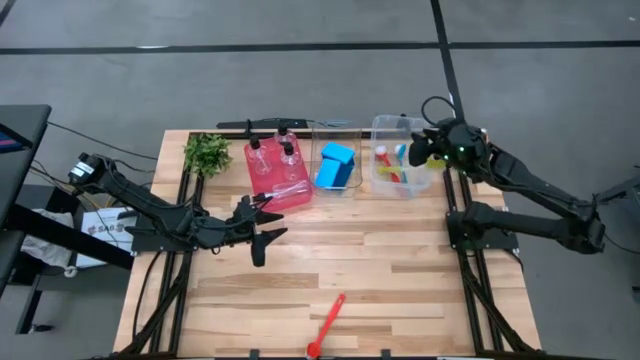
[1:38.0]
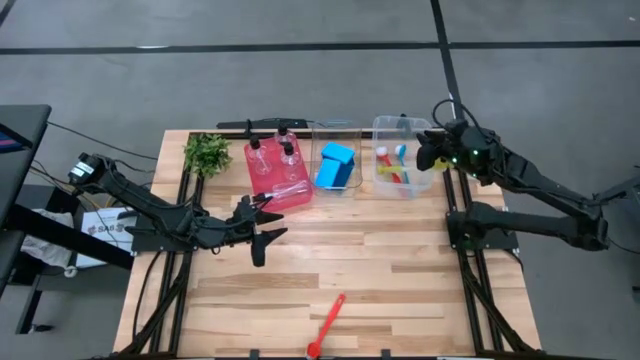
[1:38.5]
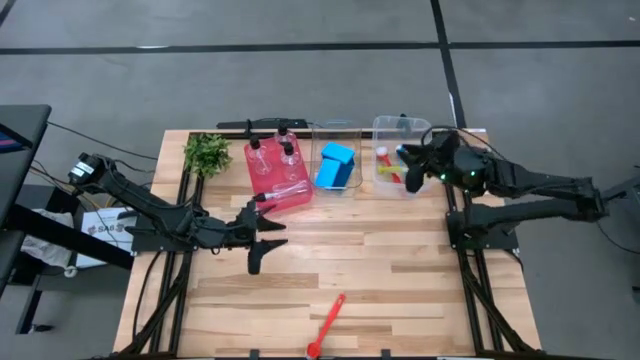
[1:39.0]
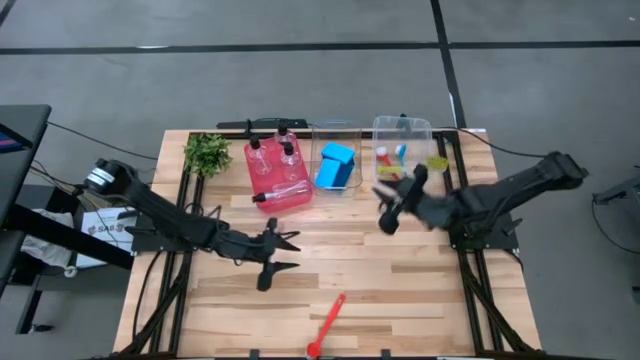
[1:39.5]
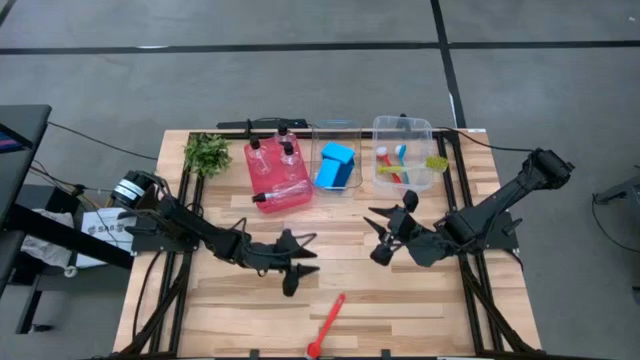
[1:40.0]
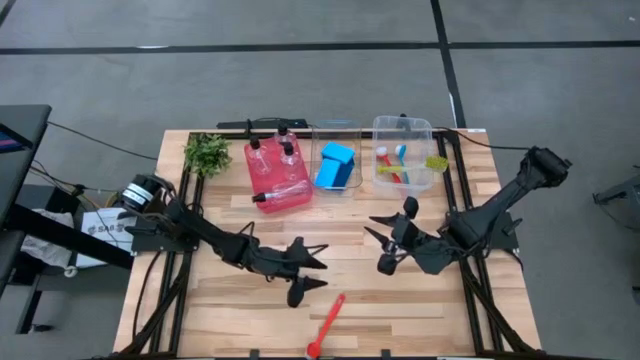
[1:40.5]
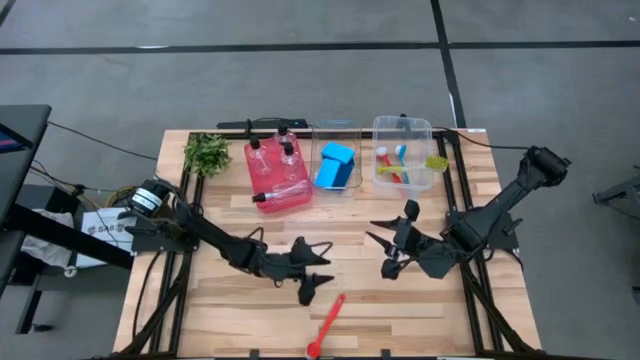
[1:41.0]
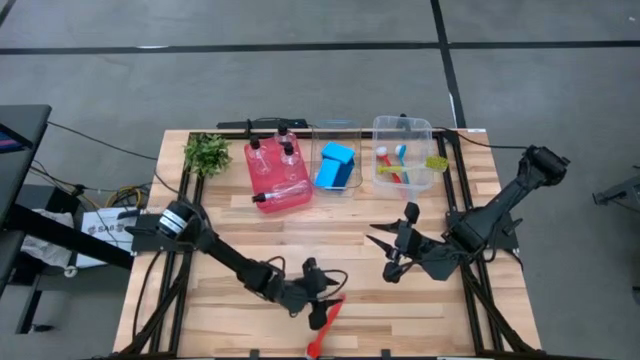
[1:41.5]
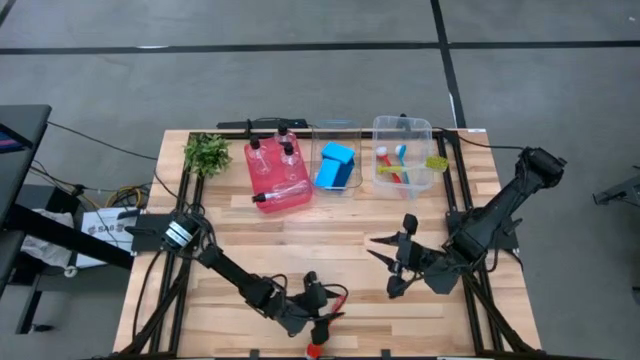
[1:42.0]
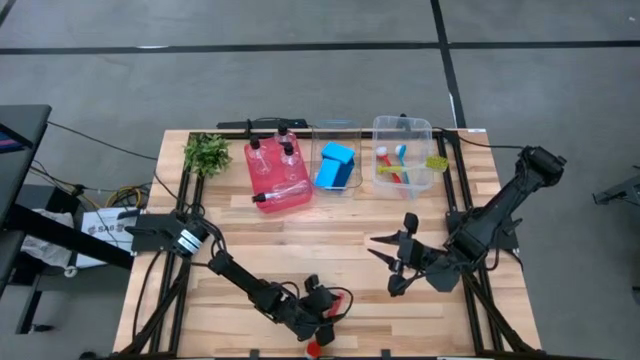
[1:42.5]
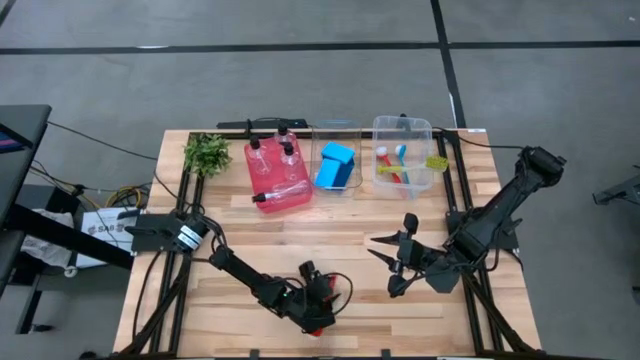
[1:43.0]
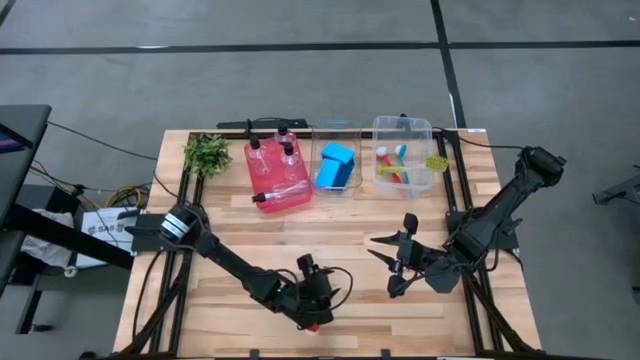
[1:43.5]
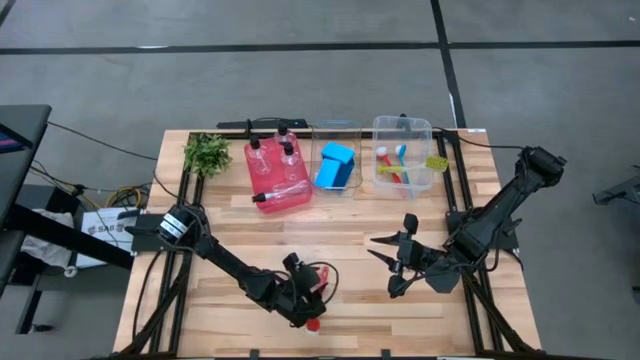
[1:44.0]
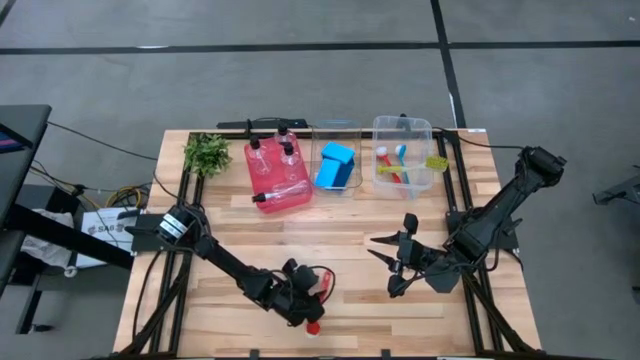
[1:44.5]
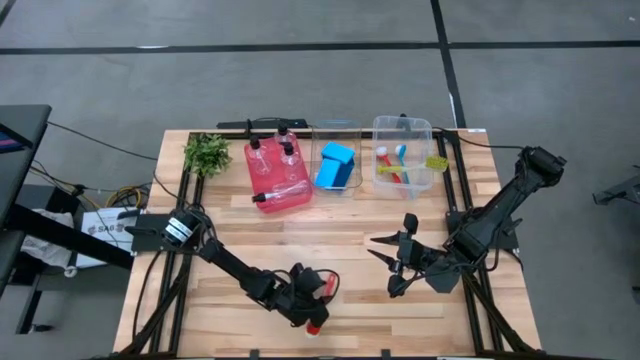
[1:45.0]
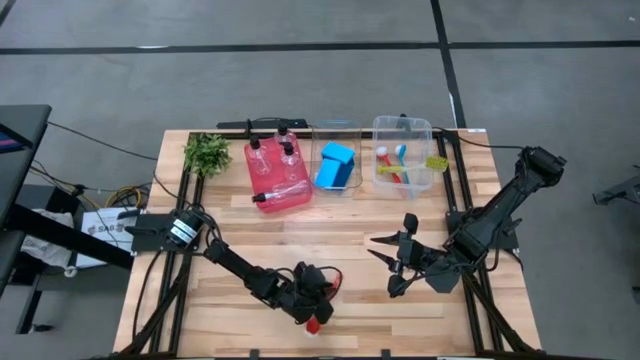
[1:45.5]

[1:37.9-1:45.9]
Task: Pick & Place Kitchen Sink Supplies
Put the green dish brush into the right transparent bin

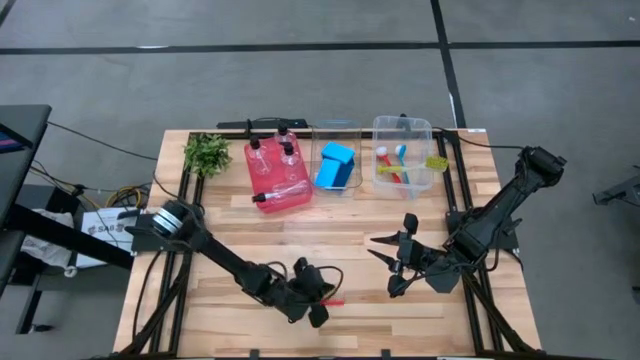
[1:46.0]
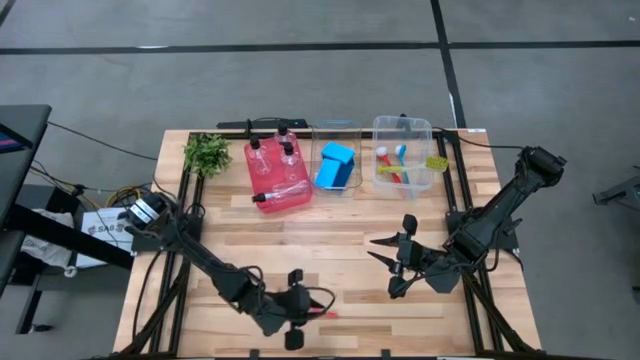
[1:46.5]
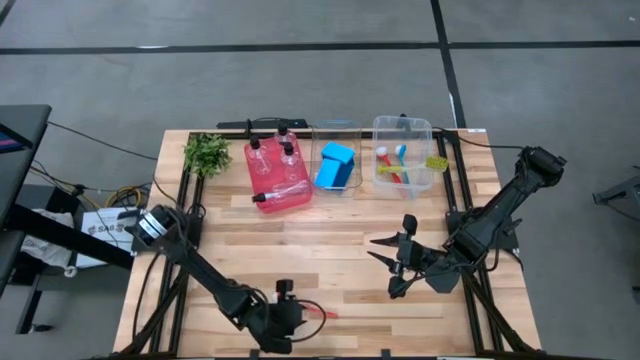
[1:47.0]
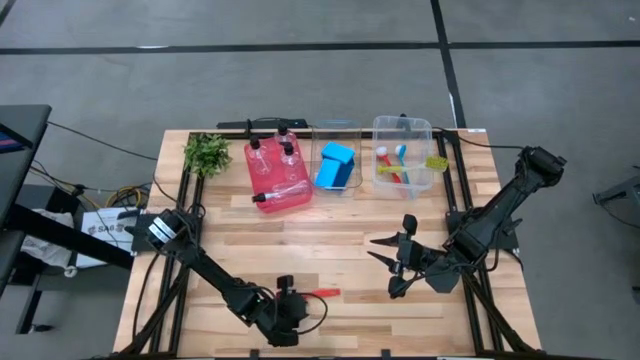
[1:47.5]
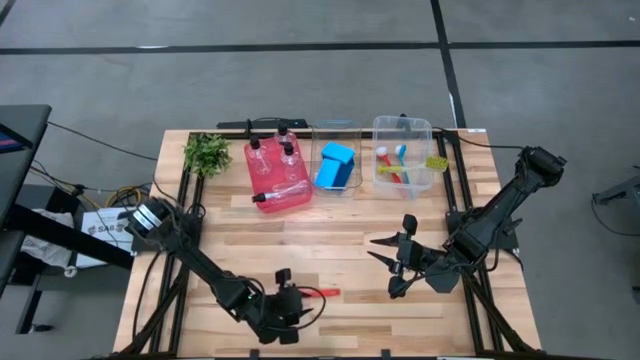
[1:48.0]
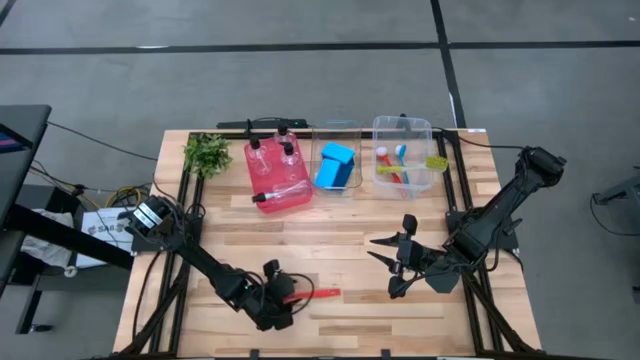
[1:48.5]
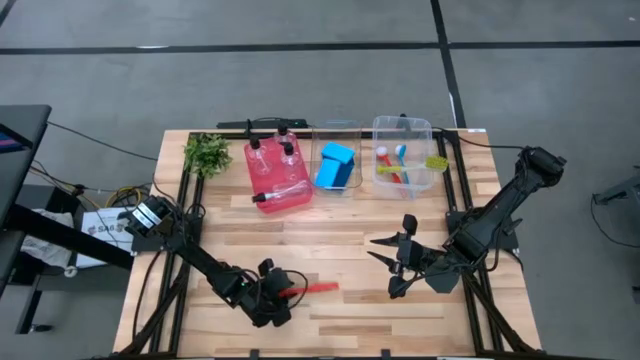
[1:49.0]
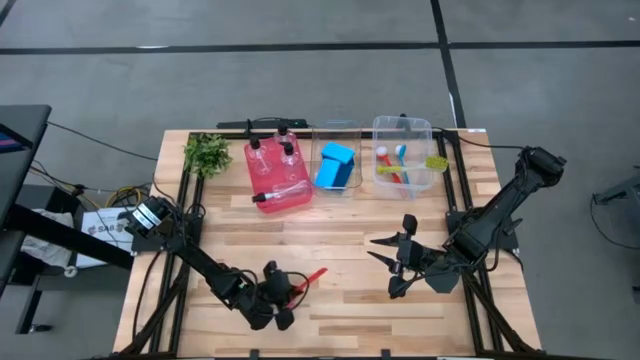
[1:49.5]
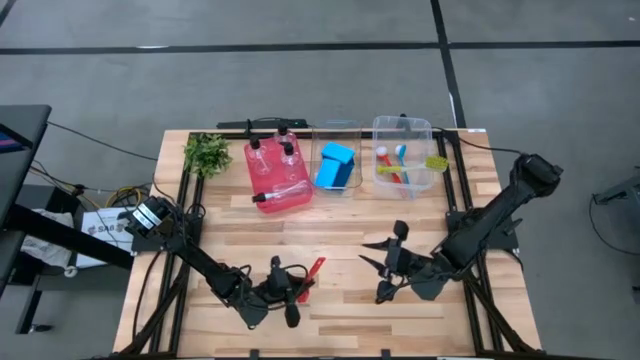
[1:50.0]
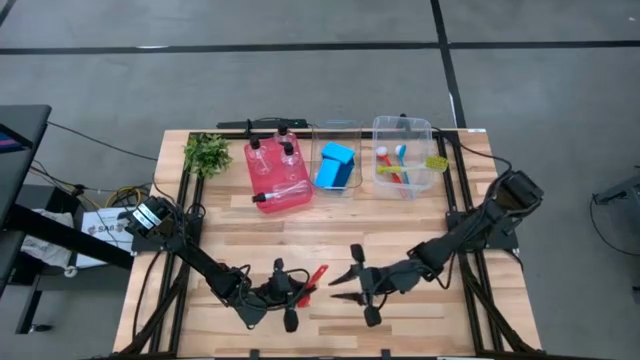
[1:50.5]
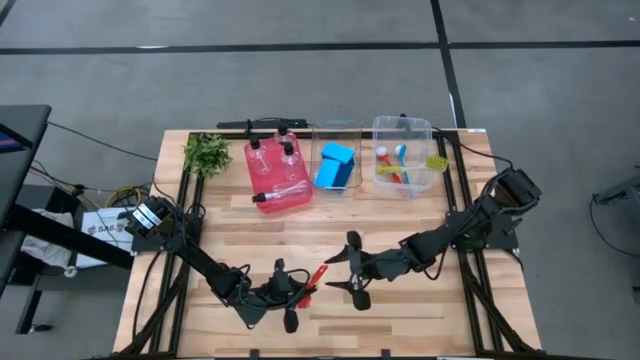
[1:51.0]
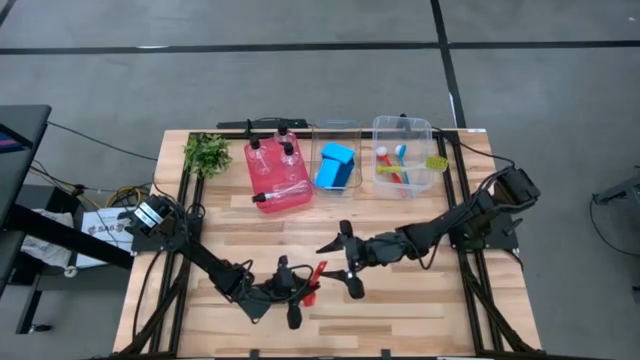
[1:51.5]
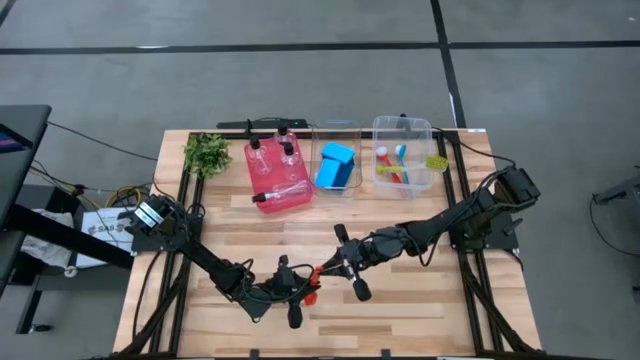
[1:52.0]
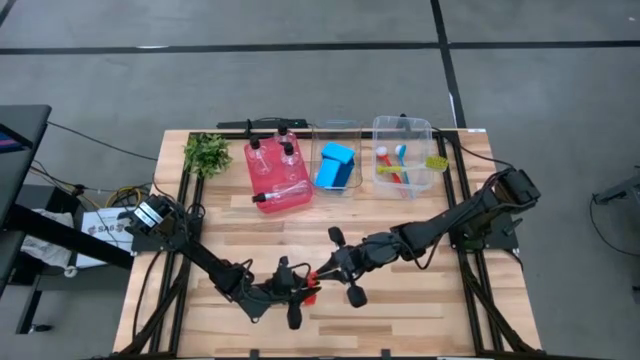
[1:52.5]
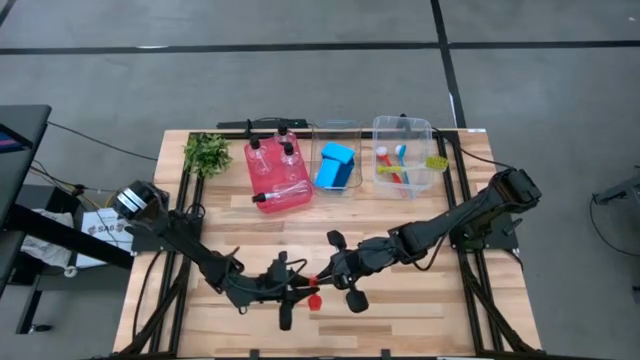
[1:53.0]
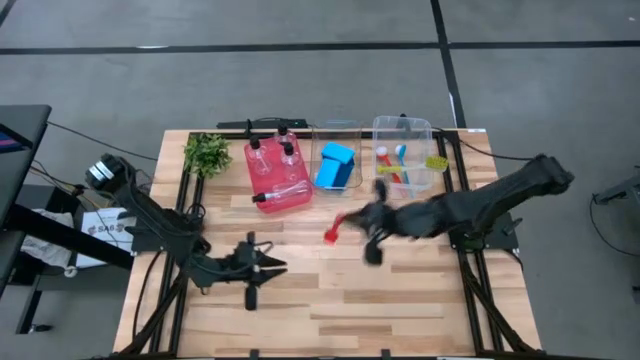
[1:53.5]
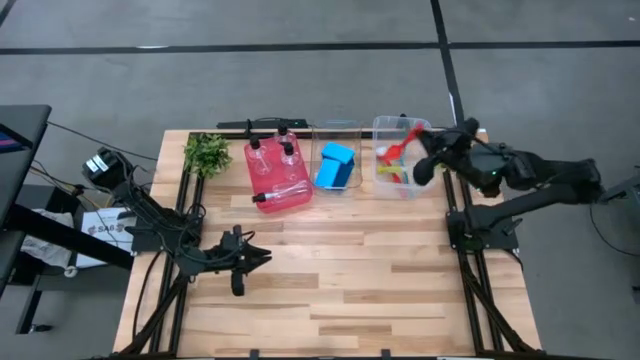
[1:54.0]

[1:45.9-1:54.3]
Put the green dish brush into the right transparent bin

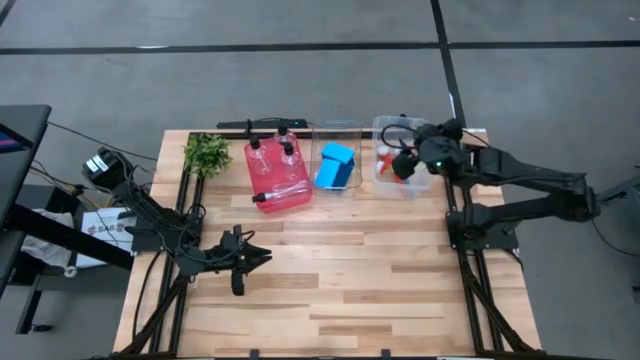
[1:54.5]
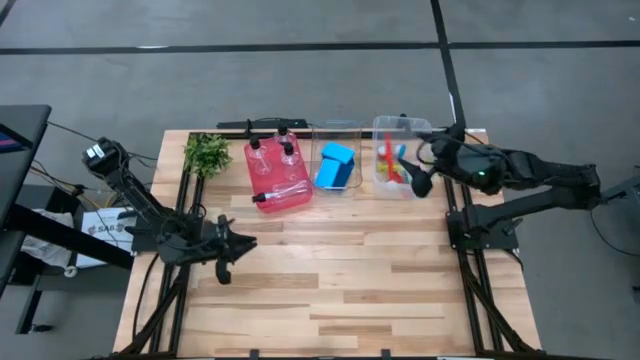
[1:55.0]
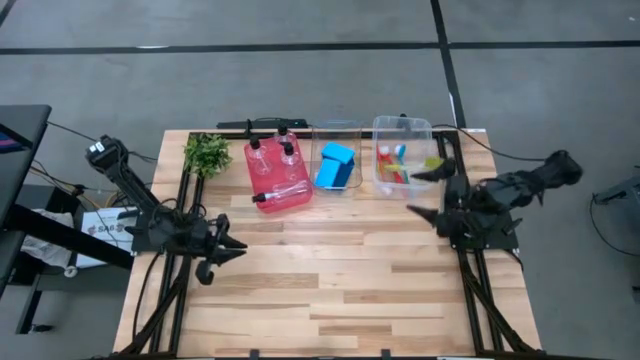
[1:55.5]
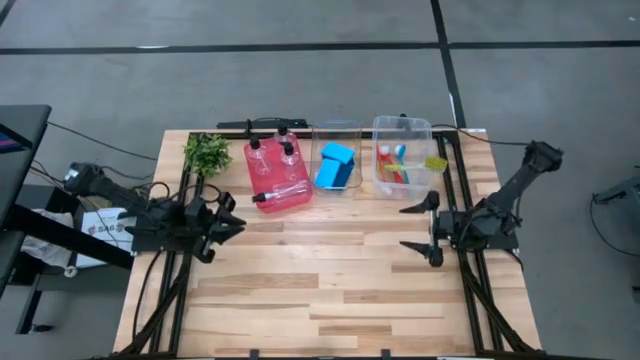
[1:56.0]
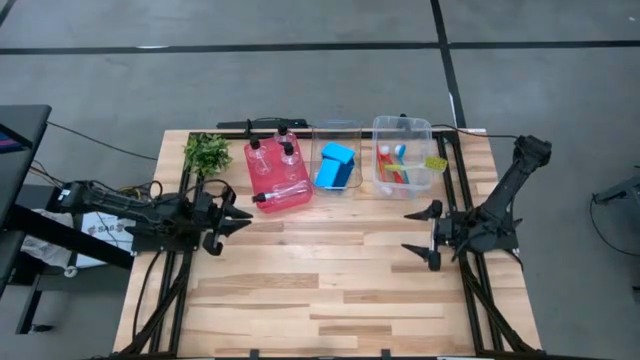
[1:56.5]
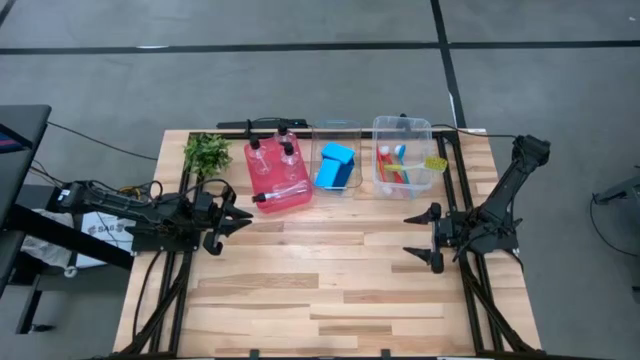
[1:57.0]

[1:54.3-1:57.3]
Return to Home Position

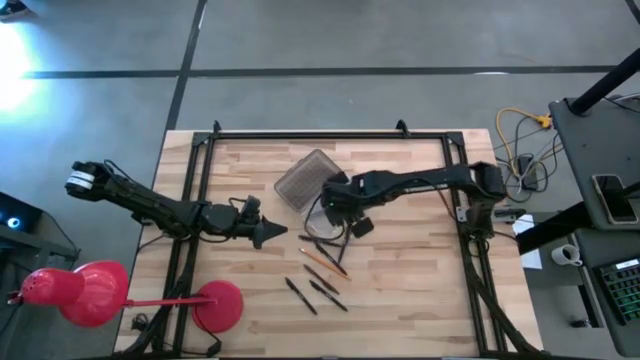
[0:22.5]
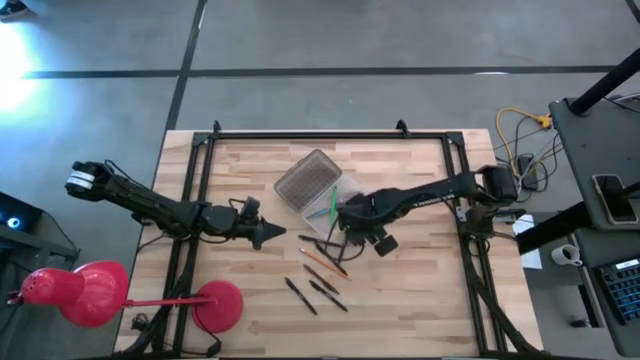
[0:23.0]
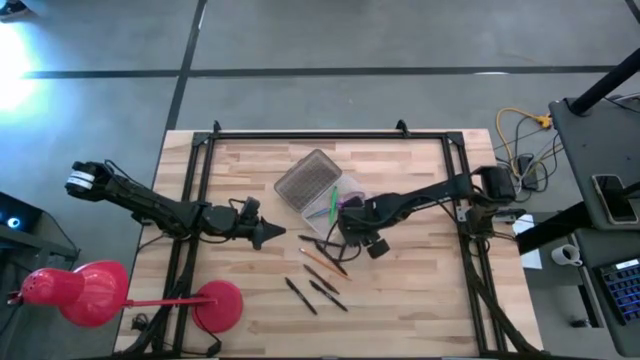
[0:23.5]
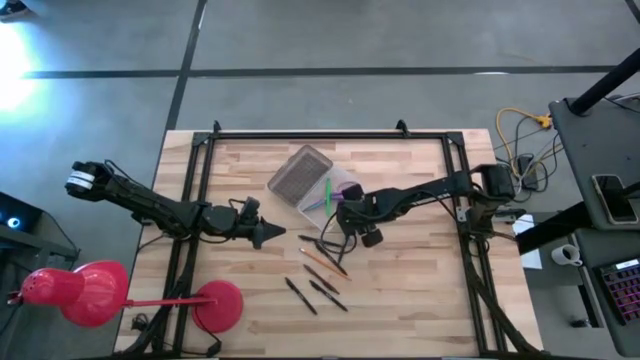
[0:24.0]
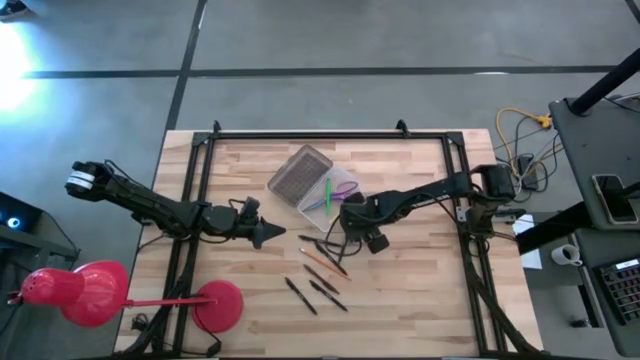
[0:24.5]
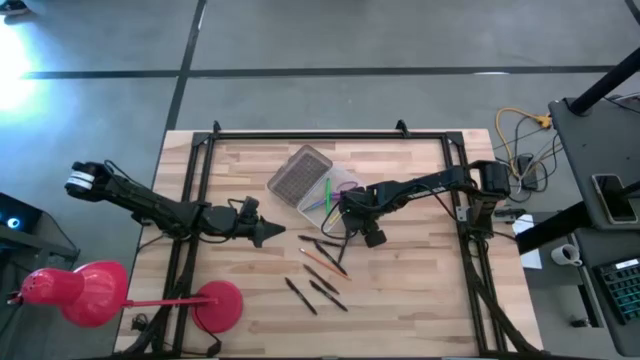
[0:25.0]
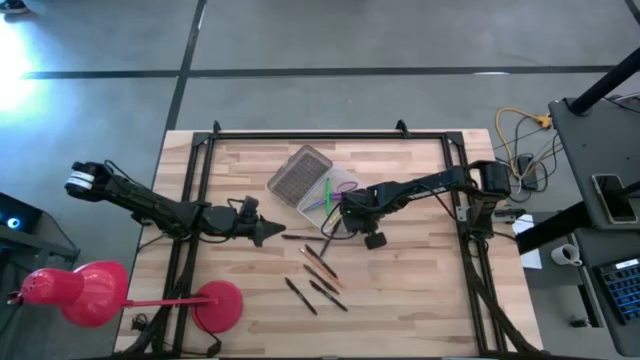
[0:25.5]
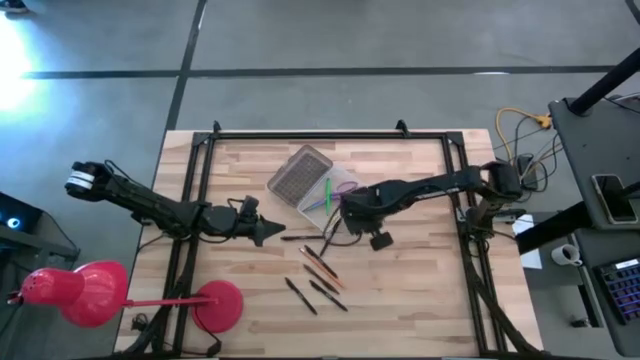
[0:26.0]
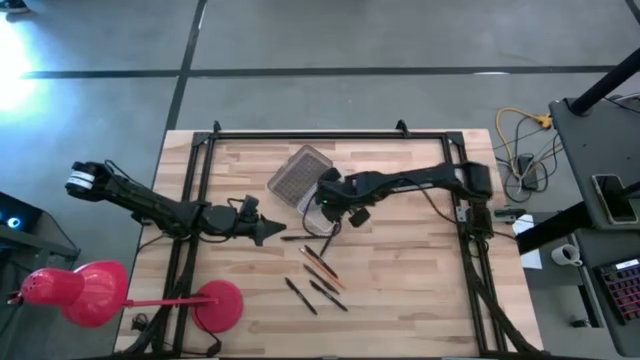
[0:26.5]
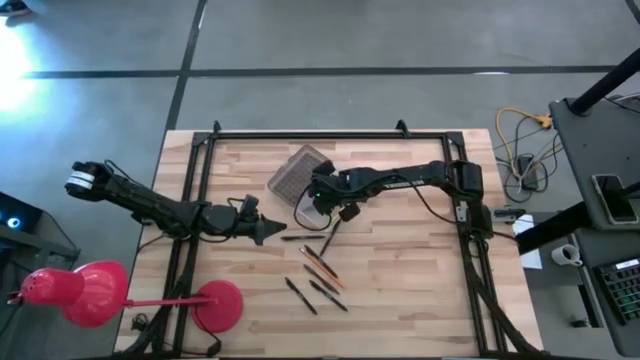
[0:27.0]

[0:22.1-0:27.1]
Task: Pick & place school supplies into a supply box
Put the purple pen into the supply box
